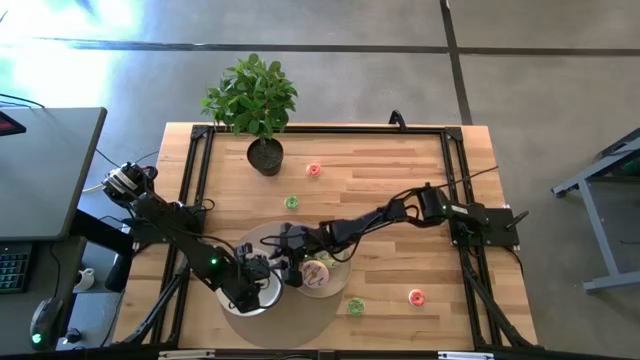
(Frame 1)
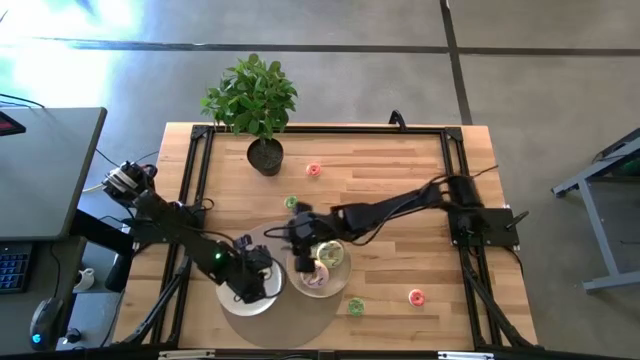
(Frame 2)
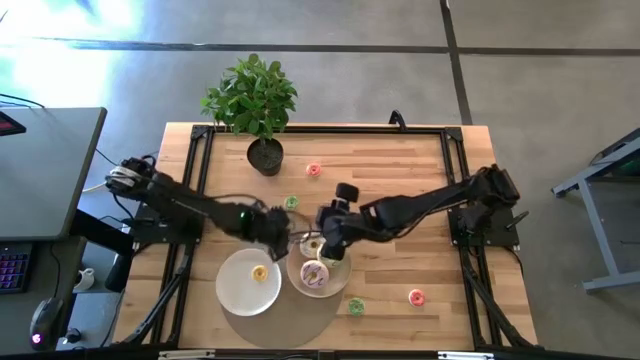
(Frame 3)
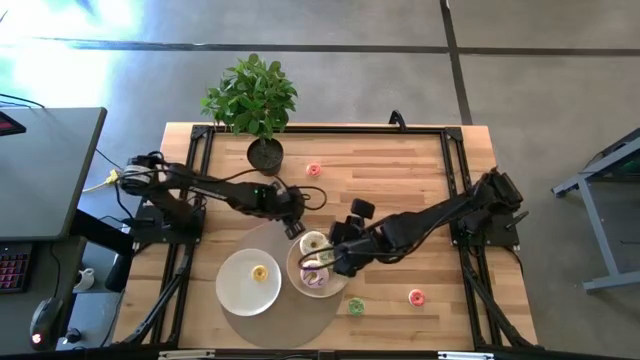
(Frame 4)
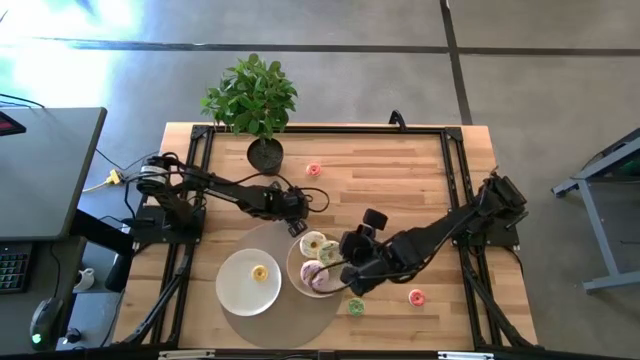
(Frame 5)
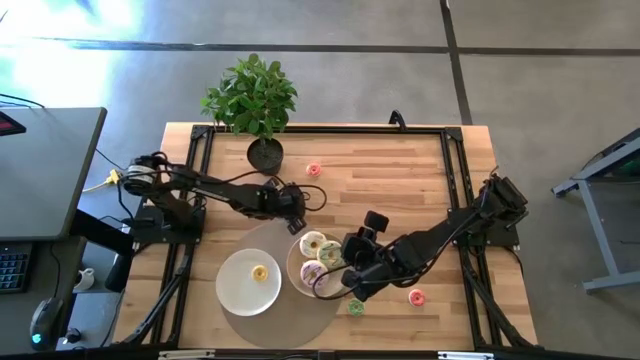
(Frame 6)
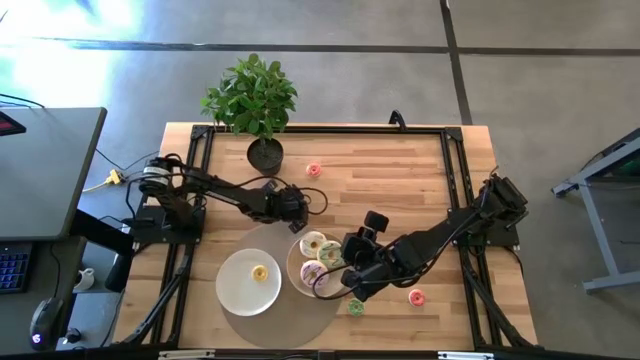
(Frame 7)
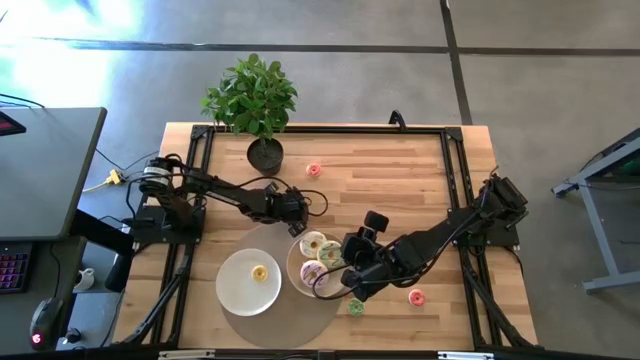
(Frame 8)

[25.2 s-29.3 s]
Task: Pick & Place donuts
Put the top small green donut on the white plate

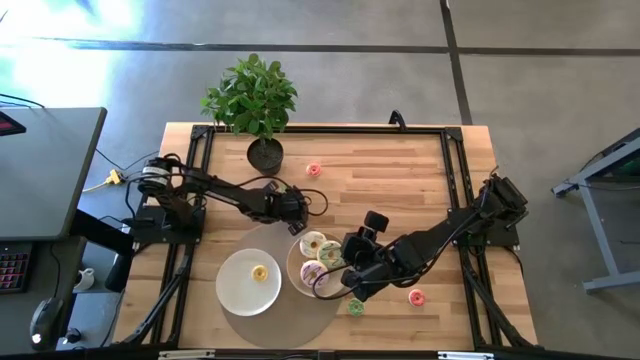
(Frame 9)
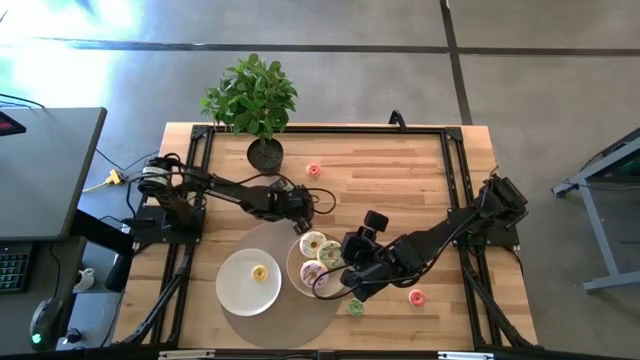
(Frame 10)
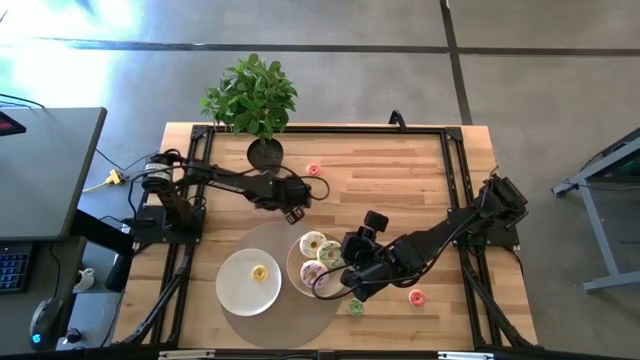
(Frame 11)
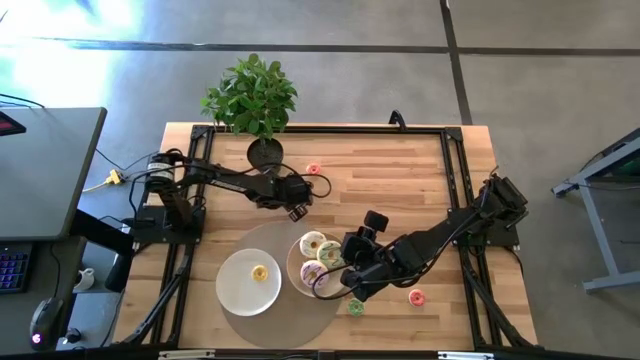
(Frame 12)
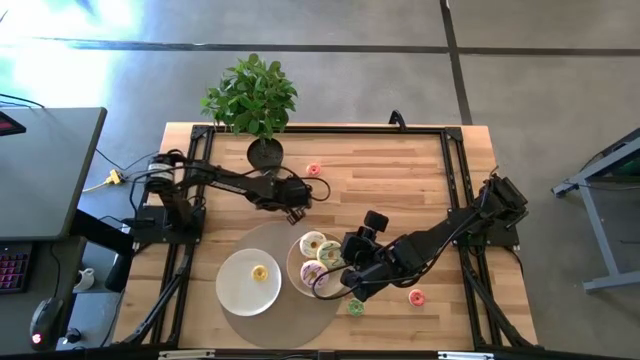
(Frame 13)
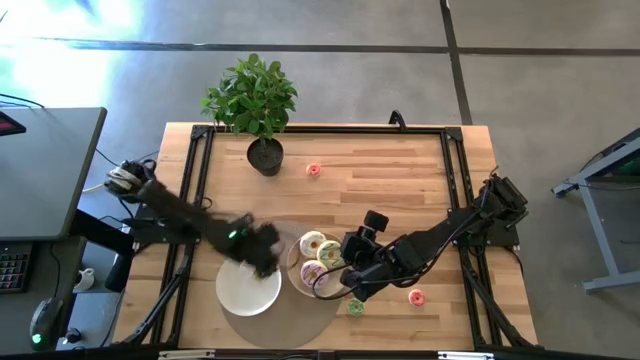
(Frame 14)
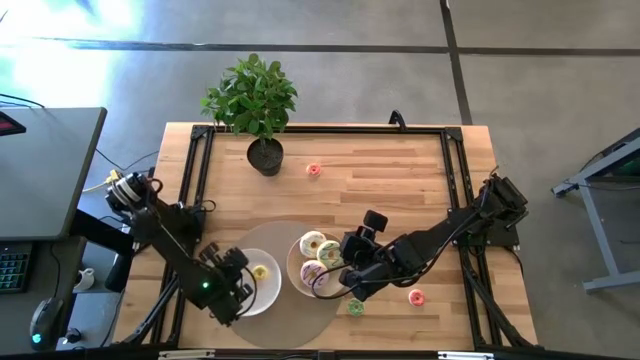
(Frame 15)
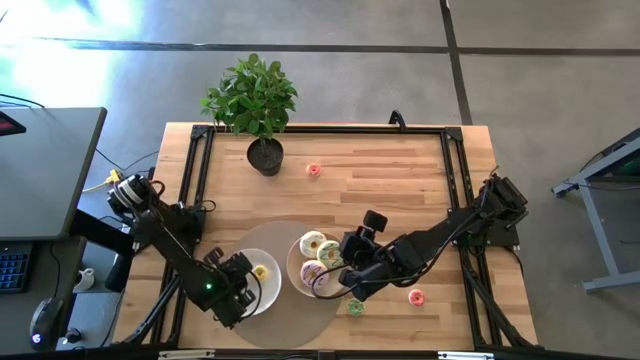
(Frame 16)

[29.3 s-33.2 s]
Put the top small green donut on the white plate

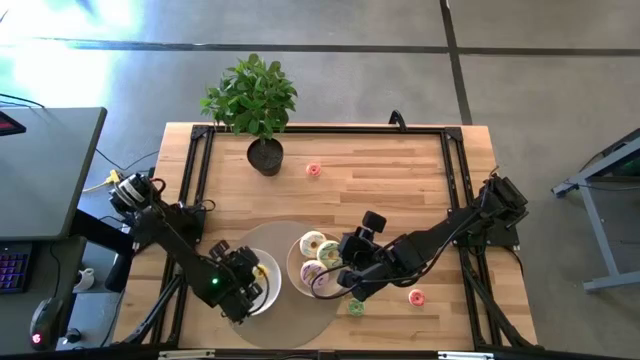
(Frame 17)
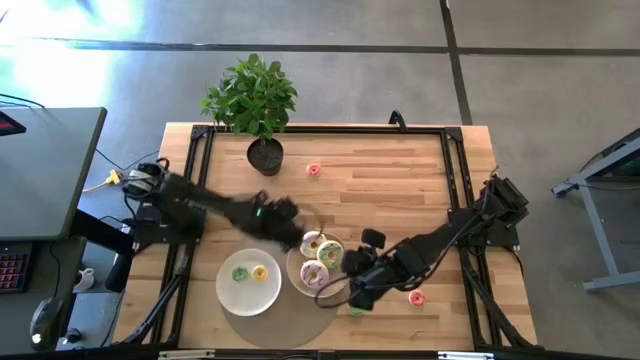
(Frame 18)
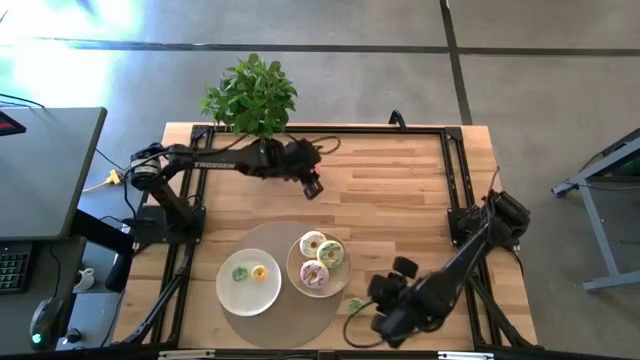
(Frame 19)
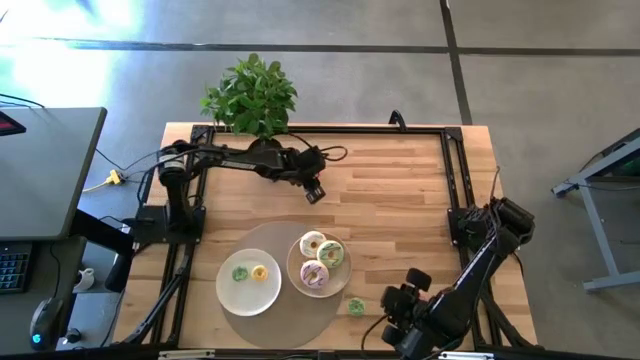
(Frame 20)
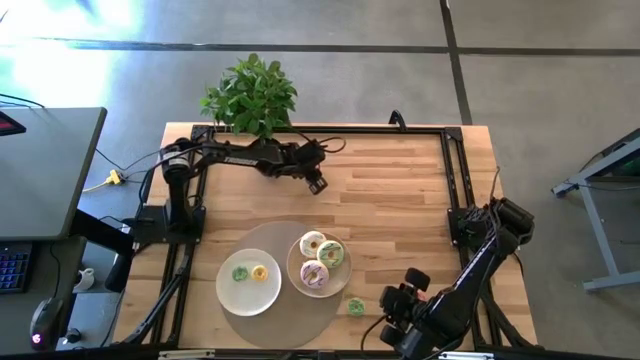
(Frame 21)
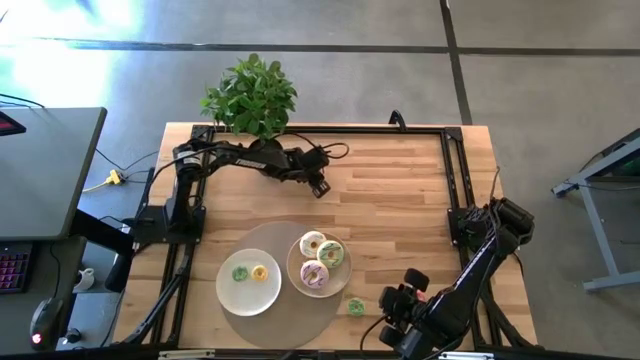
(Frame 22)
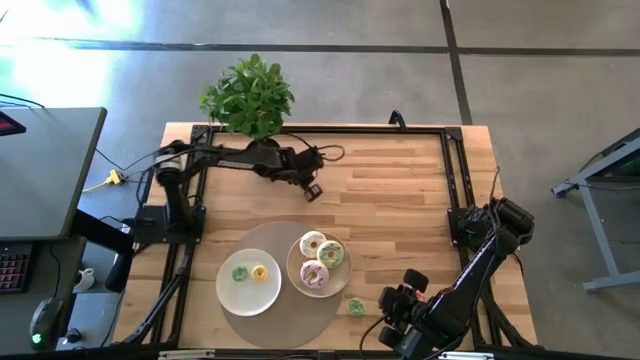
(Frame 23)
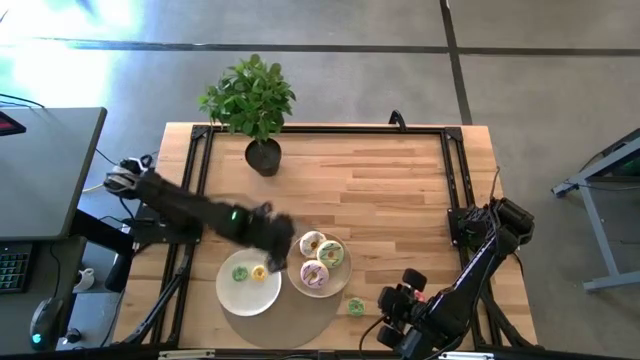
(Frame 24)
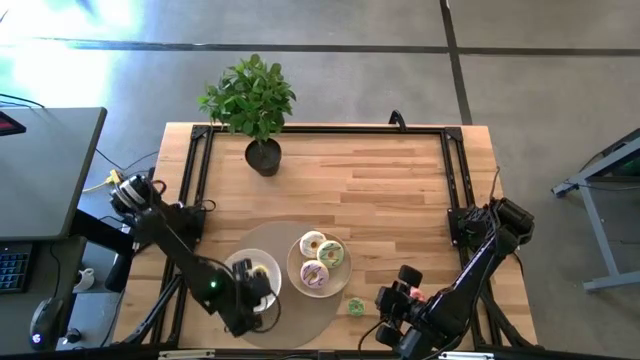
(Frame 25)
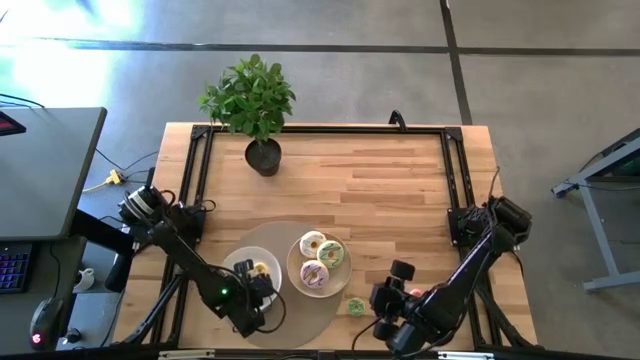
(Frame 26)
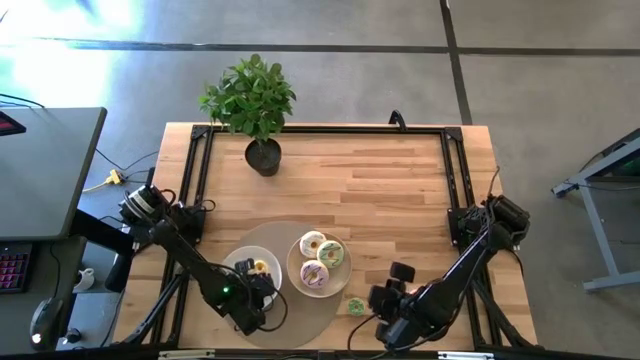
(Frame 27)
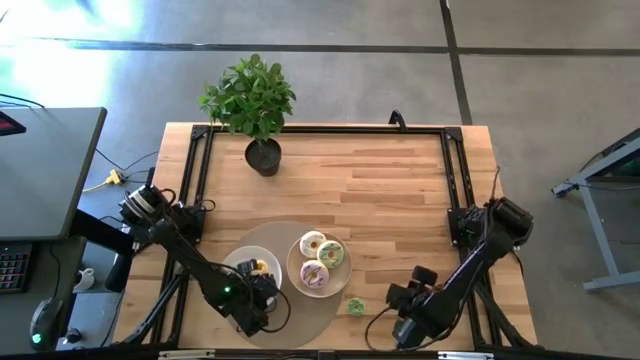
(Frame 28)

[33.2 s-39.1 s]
Put the top small pink donut on the white plate

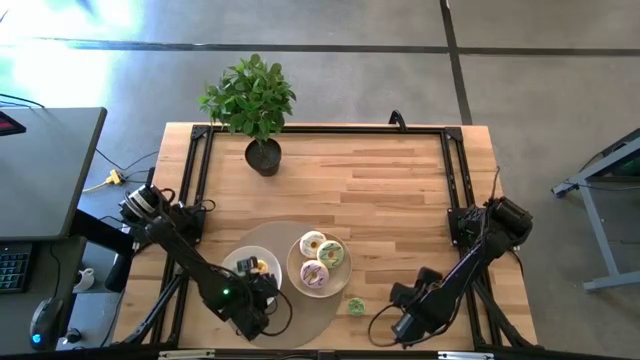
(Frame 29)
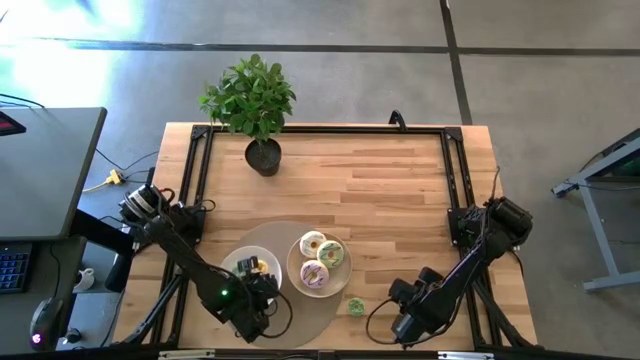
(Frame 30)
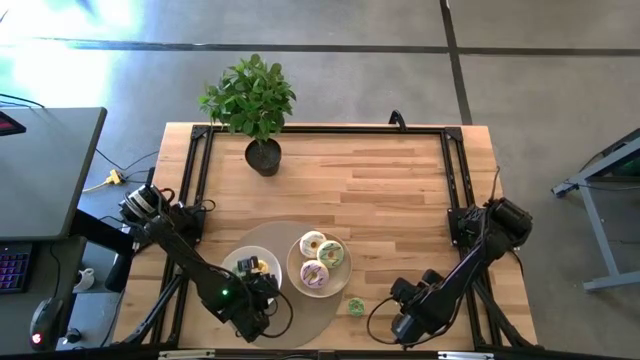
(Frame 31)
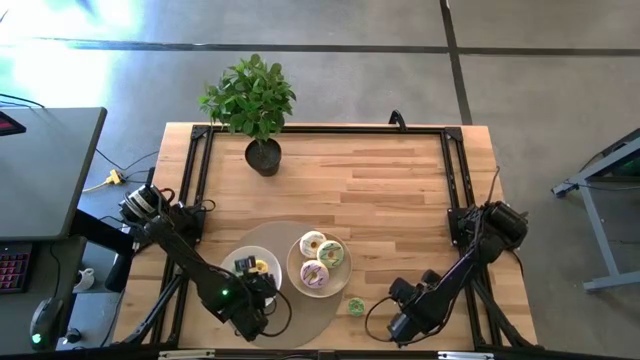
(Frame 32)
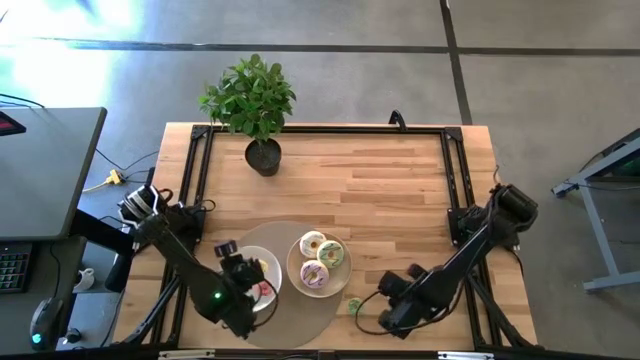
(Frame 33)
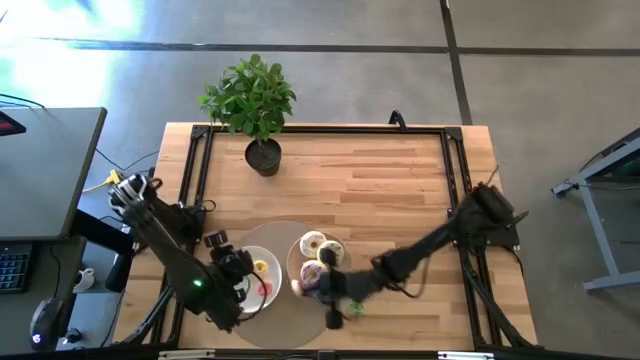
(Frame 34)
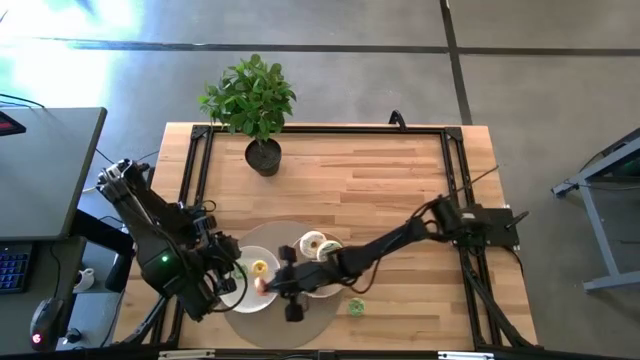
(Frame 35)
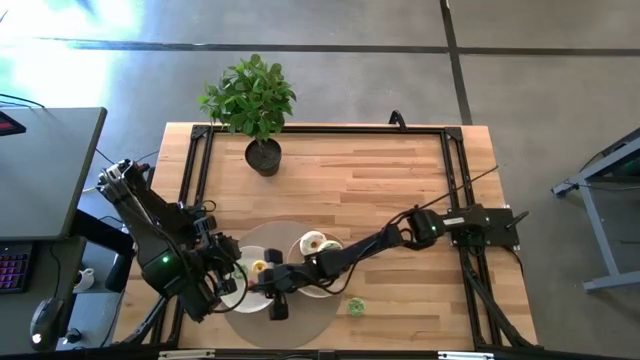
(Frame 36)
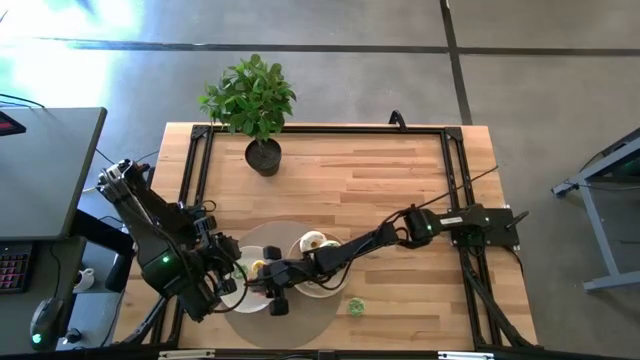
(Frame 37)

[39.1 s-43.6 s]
Put the small pink donut on the white plate

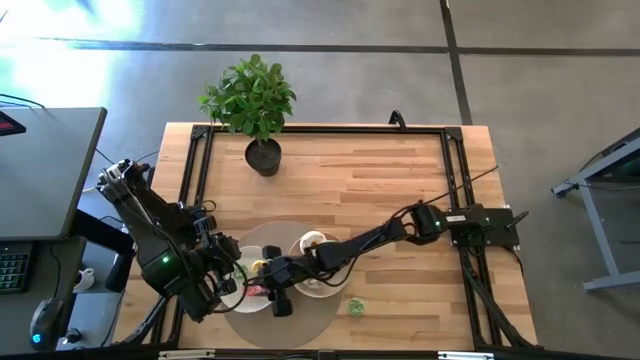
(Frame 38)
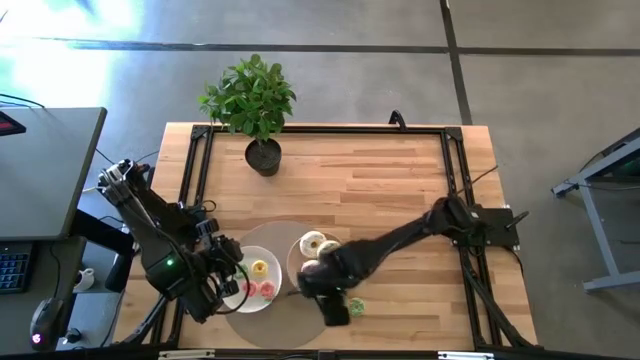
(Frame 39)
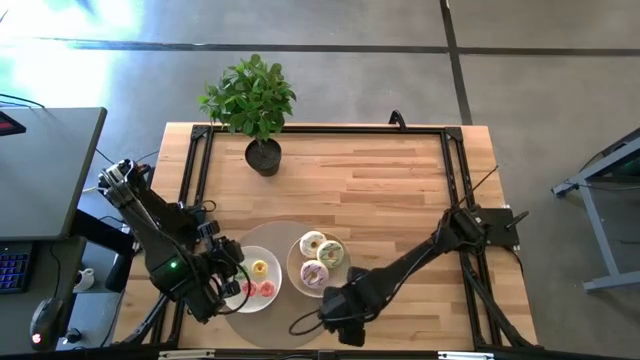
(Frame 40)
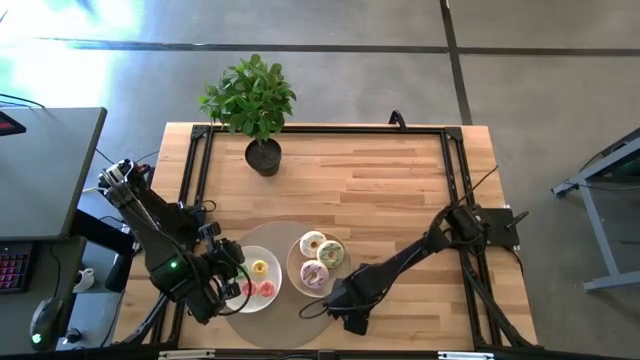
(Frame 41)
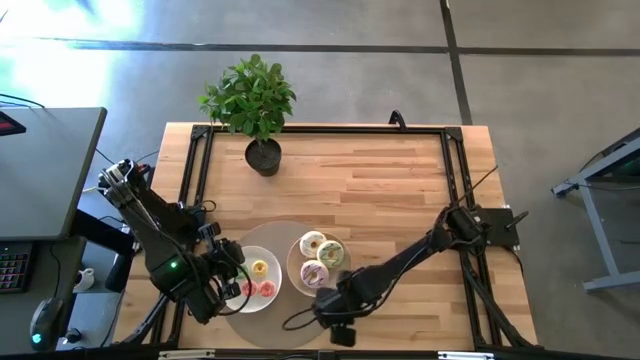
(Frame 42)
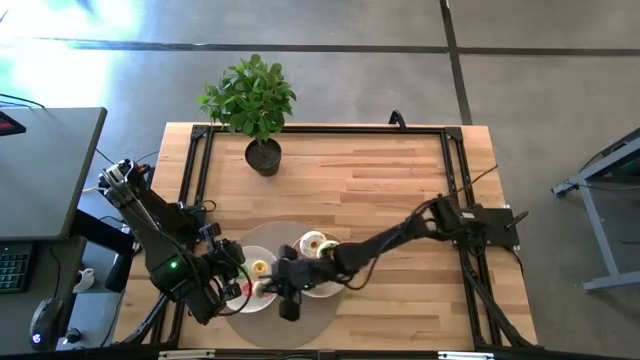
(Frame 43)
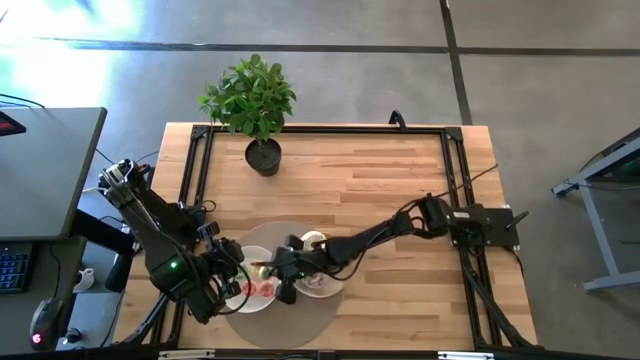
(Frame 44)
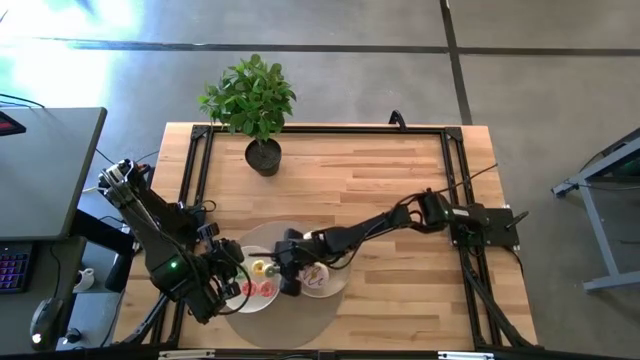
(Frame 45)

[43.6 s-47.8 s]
Put the small green donut on the white plate
